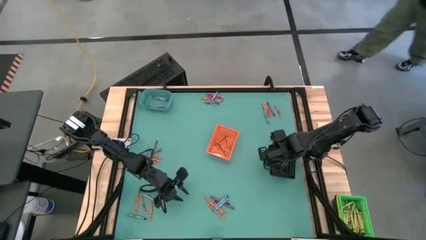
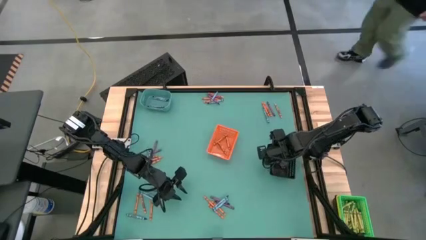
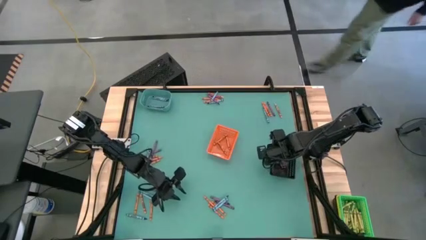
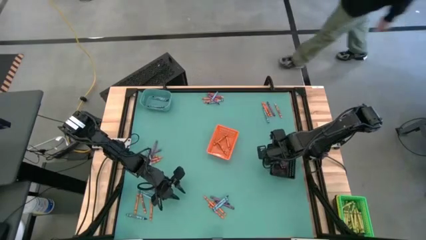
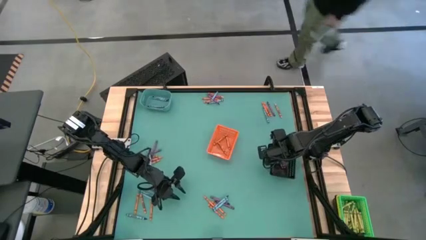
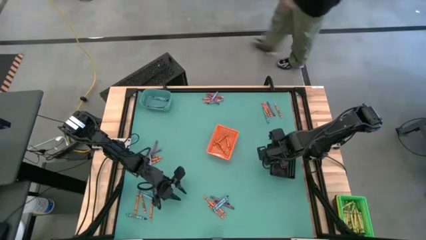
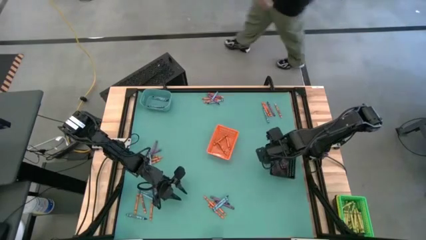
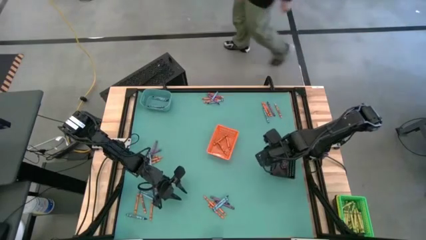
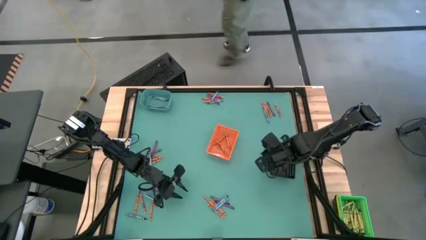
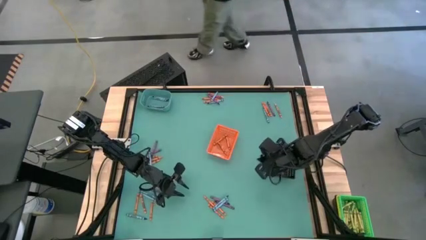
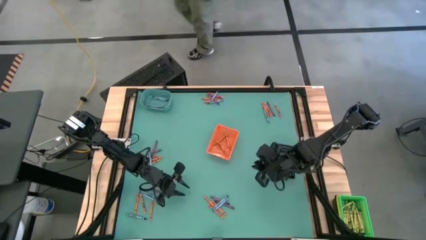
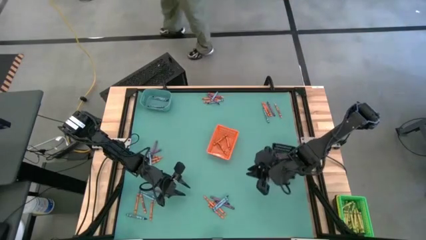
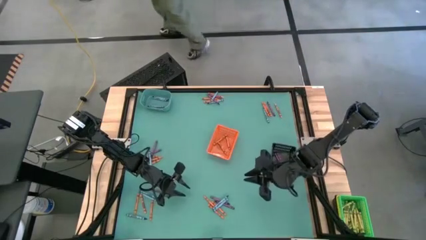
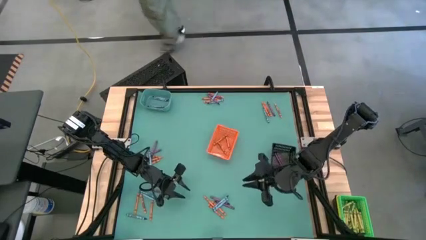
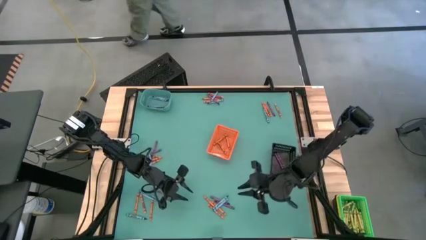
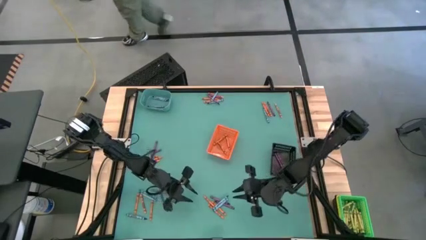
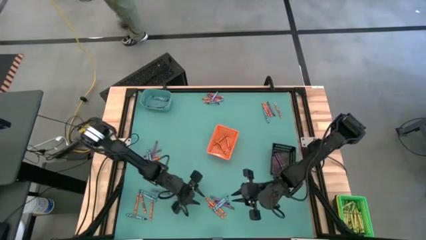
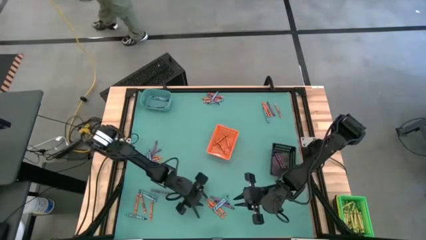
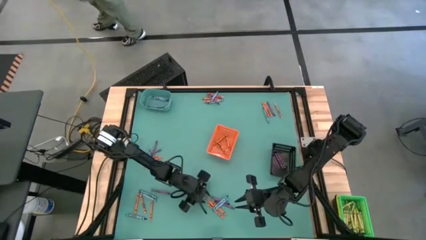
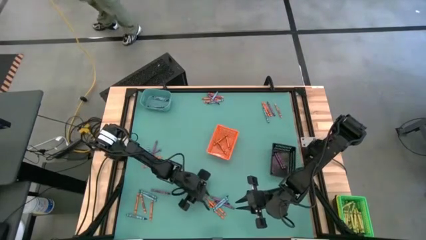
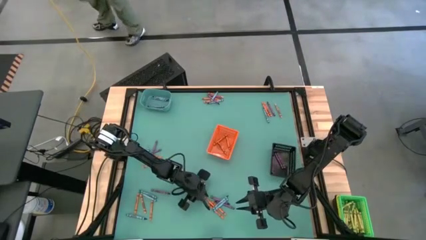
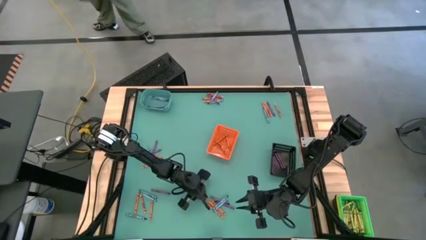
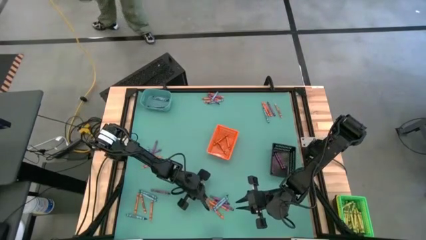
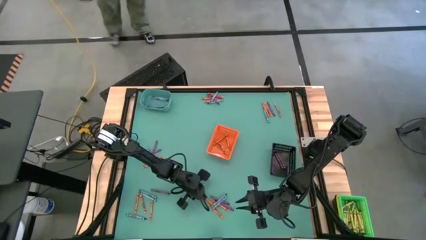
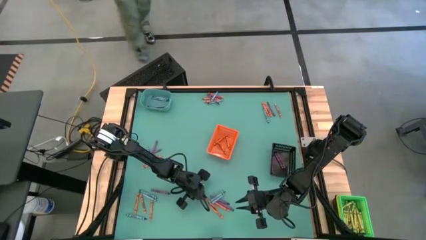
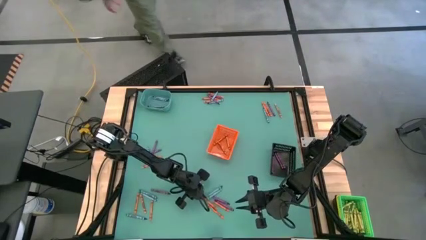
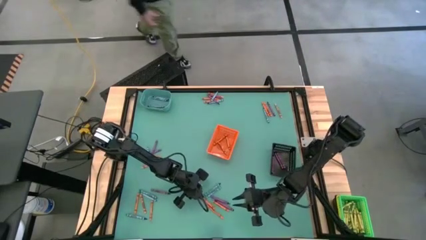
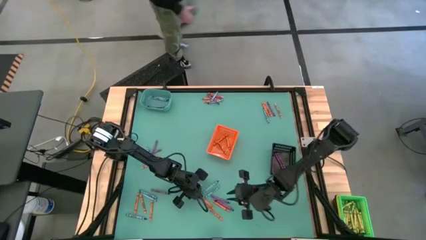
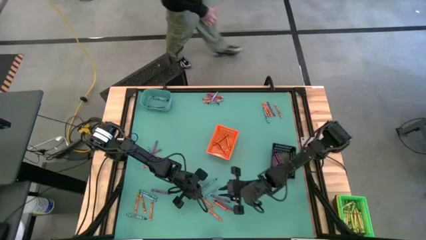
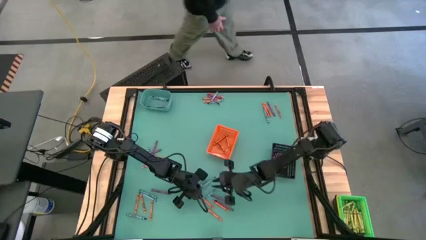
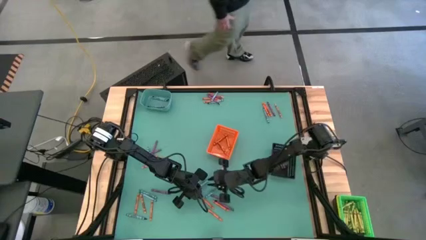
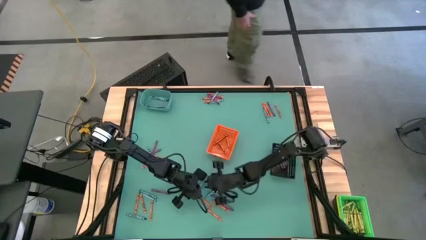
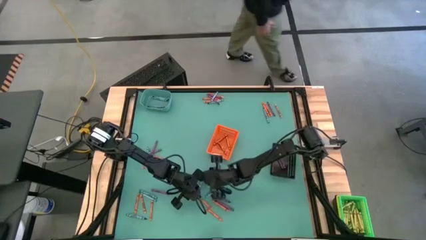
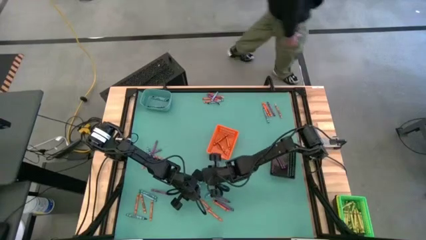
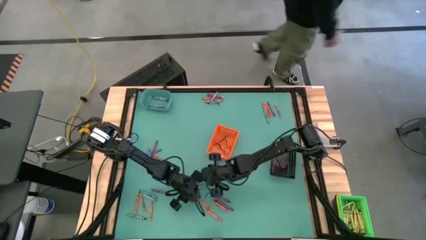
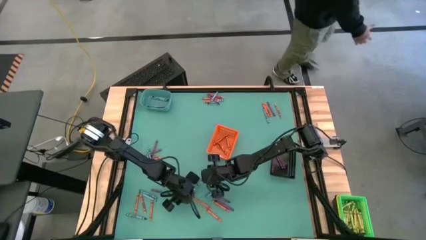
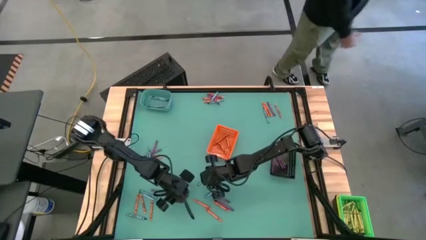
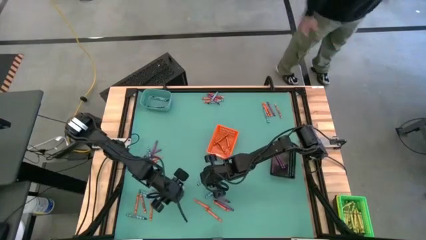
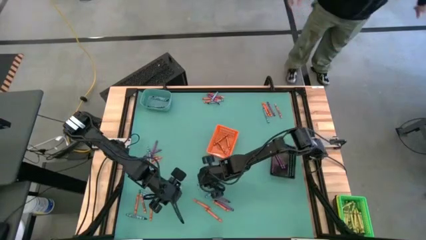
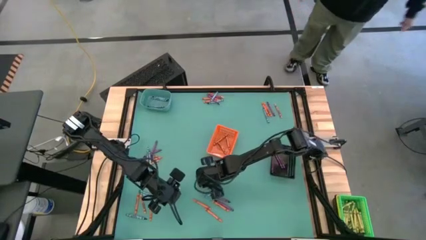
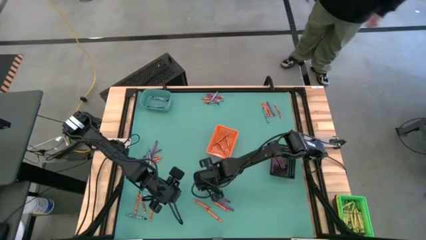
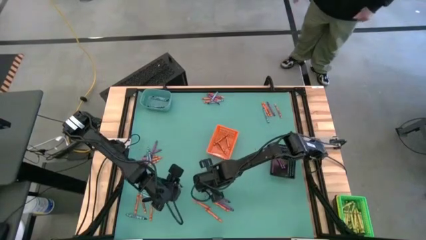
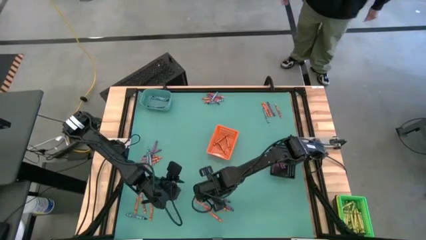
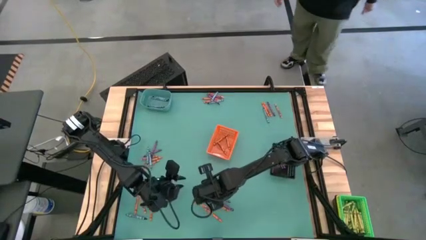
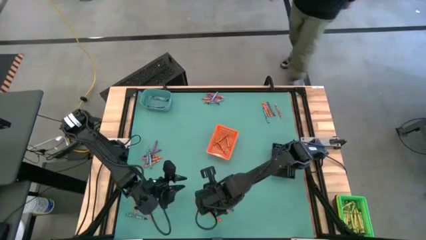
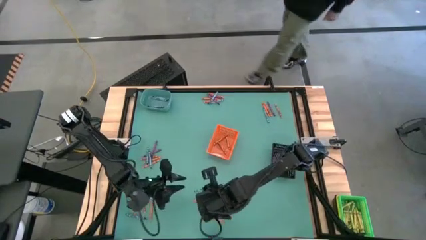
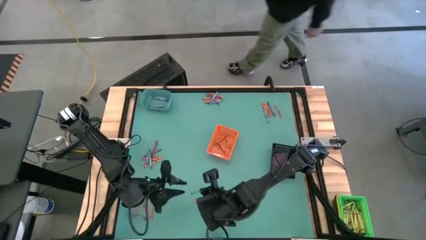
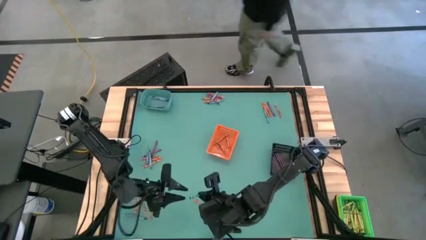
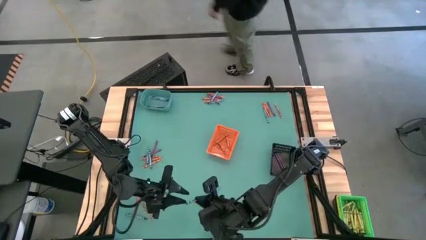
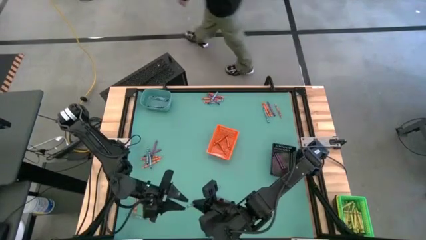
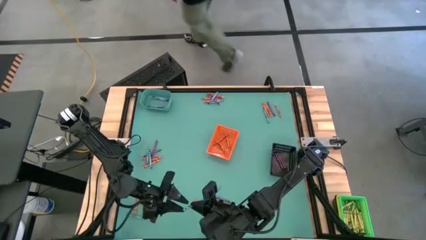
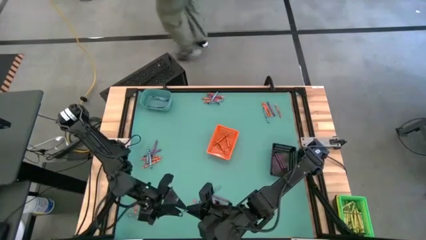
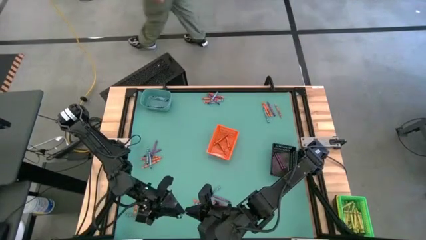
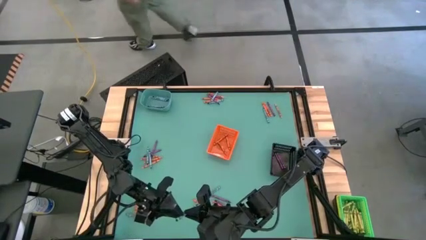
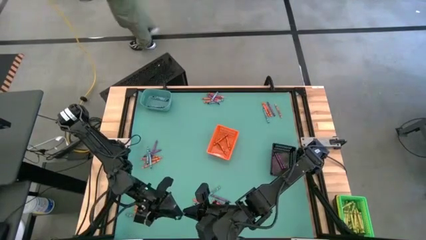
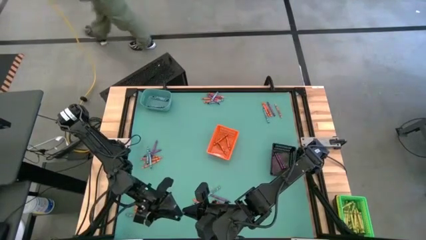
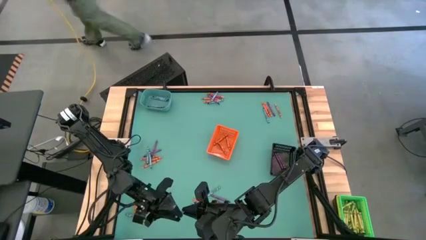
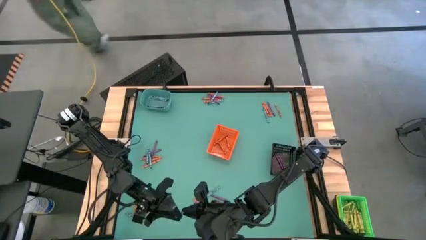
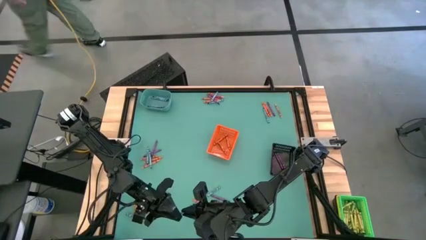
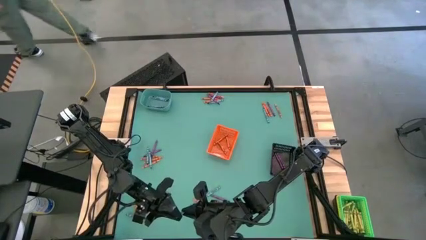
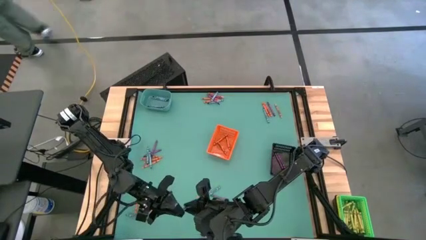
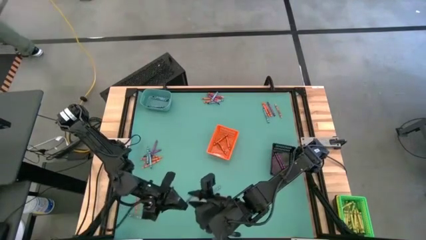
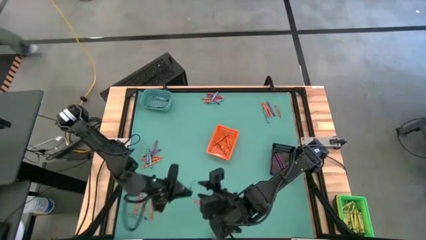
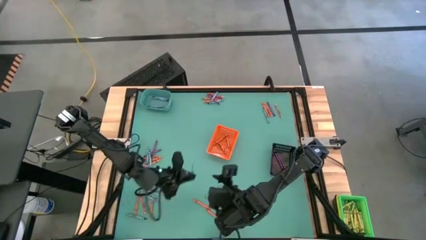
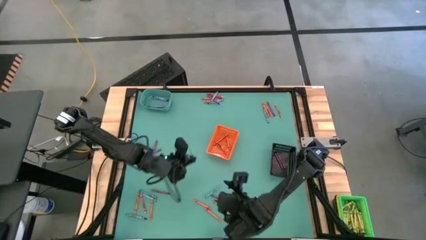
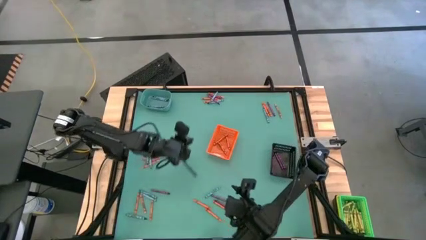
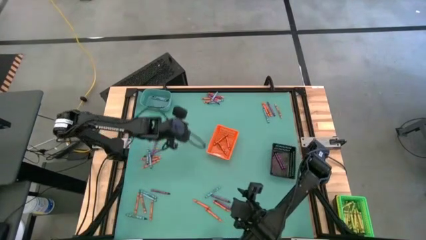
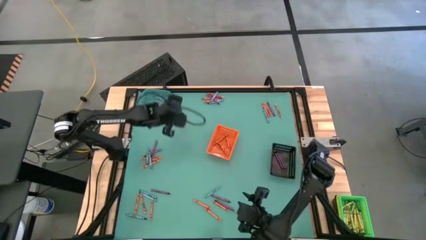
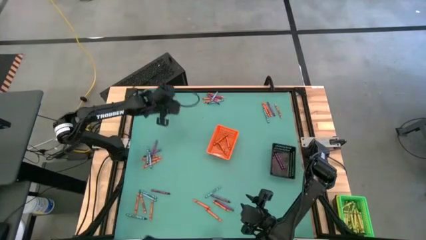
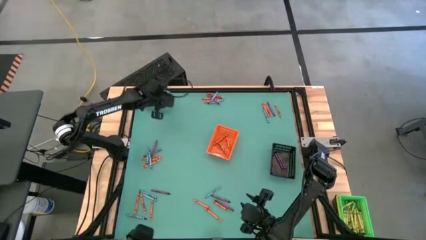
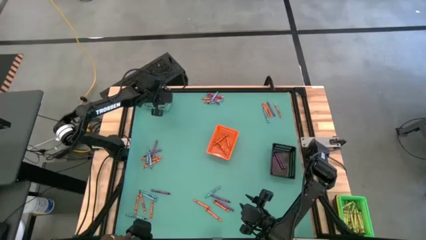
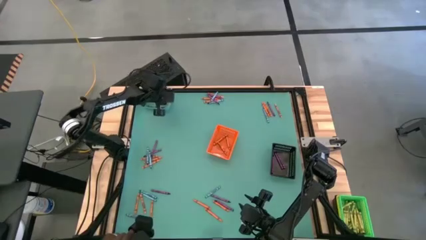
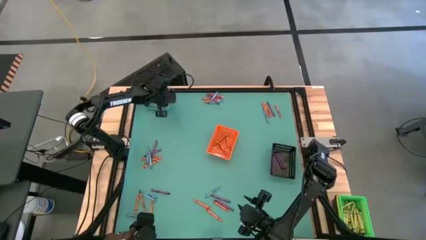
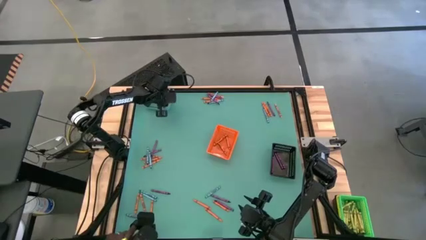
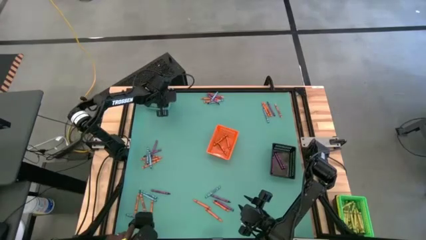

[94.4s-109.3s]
Task: Sort crayons
Put the blue crayon into the blue bin
